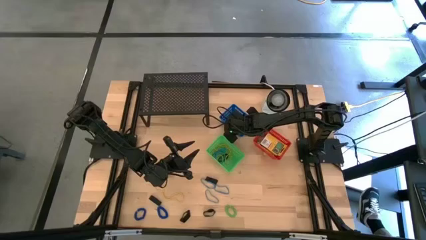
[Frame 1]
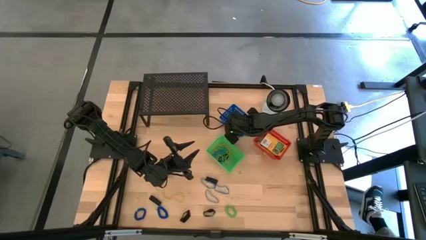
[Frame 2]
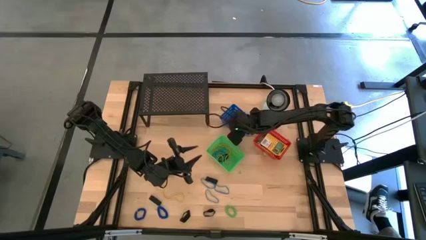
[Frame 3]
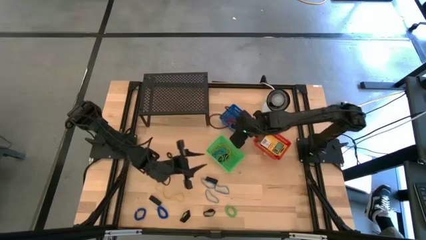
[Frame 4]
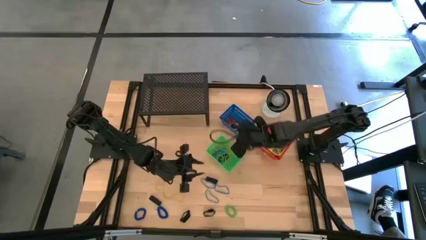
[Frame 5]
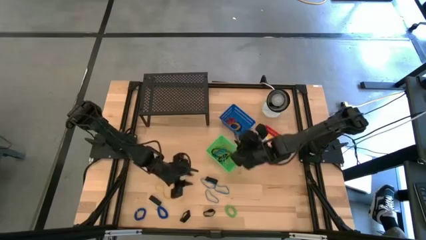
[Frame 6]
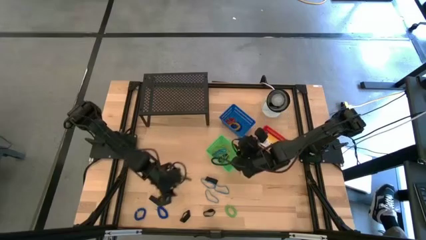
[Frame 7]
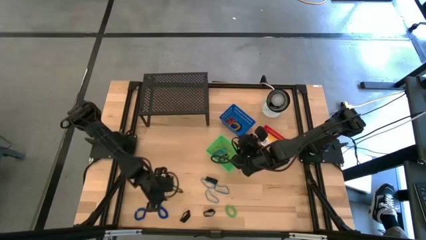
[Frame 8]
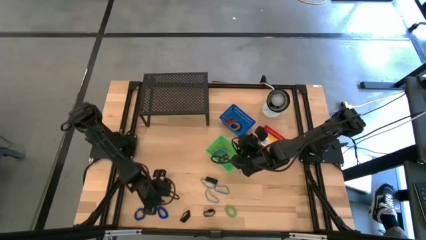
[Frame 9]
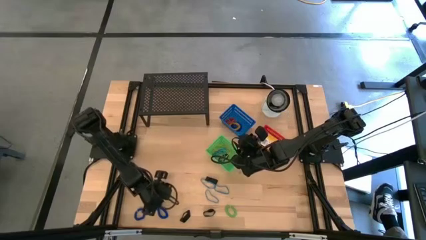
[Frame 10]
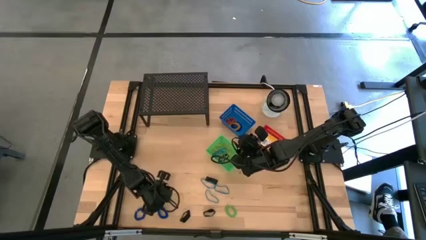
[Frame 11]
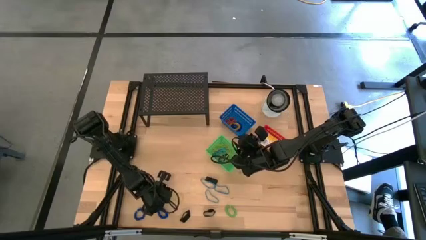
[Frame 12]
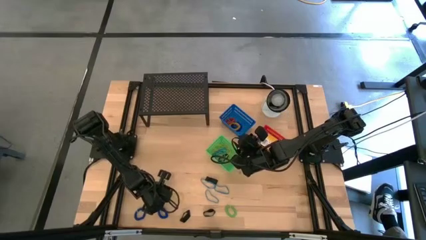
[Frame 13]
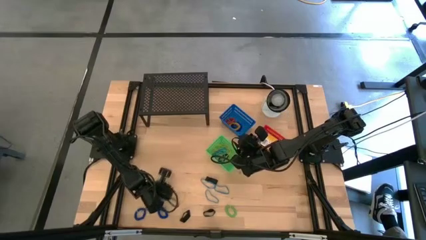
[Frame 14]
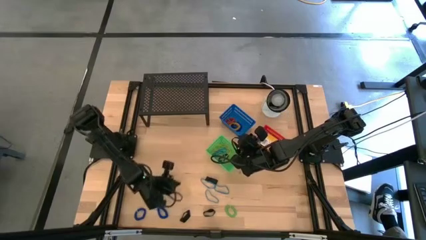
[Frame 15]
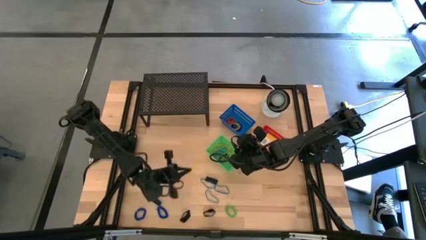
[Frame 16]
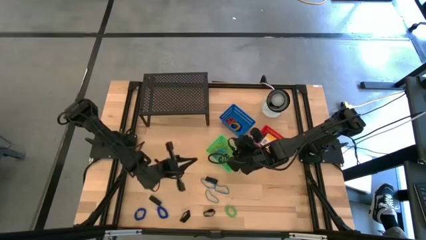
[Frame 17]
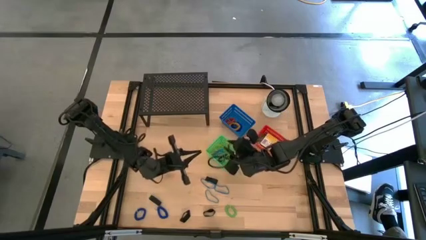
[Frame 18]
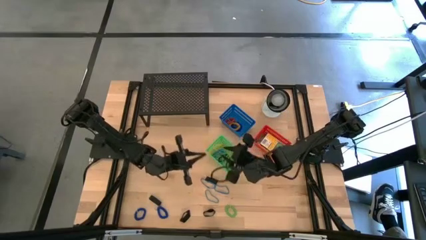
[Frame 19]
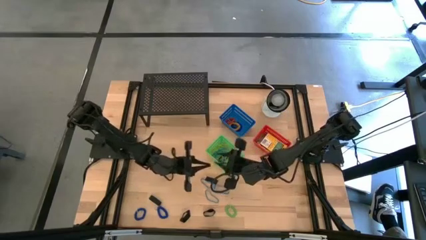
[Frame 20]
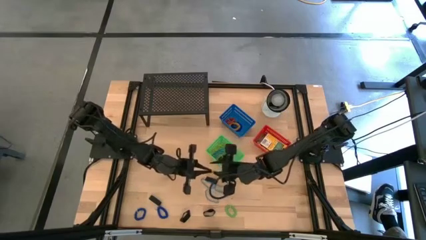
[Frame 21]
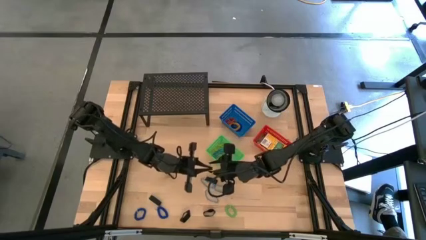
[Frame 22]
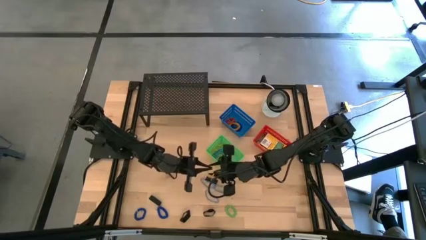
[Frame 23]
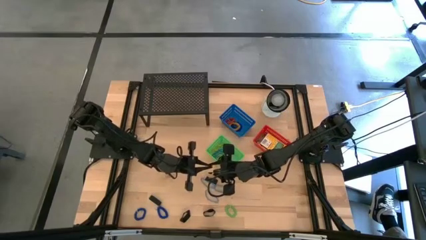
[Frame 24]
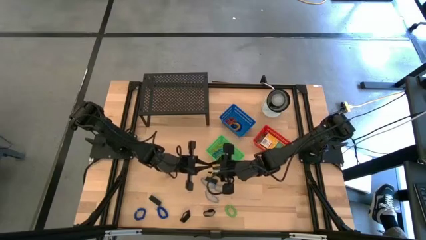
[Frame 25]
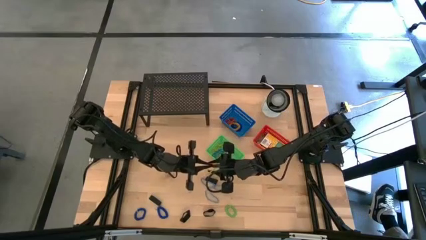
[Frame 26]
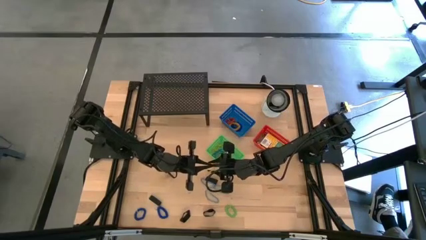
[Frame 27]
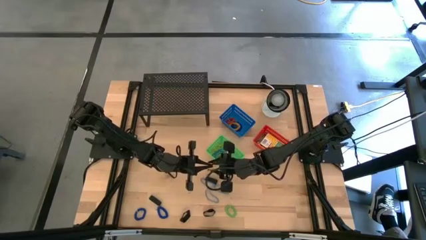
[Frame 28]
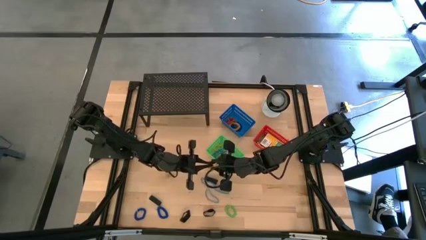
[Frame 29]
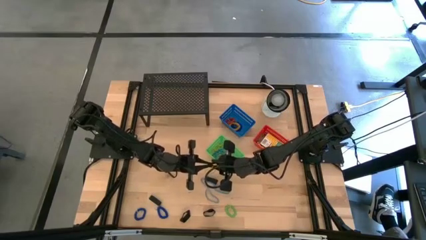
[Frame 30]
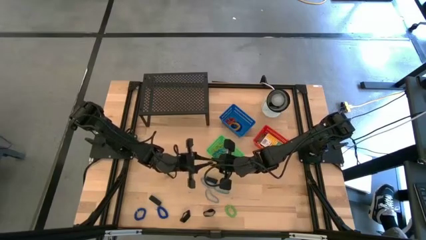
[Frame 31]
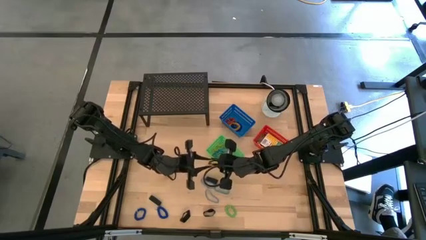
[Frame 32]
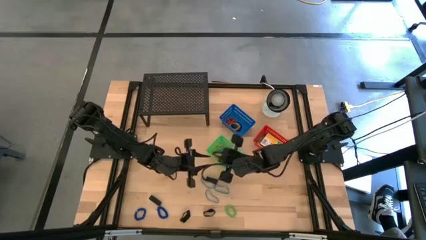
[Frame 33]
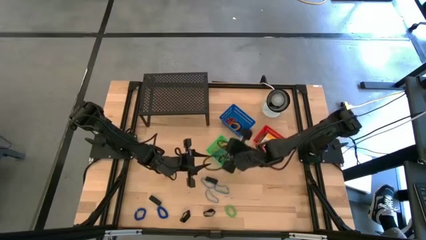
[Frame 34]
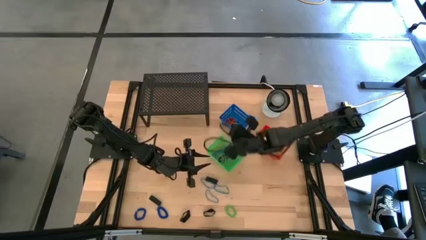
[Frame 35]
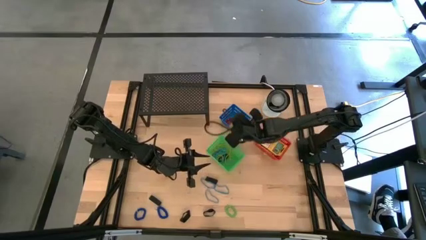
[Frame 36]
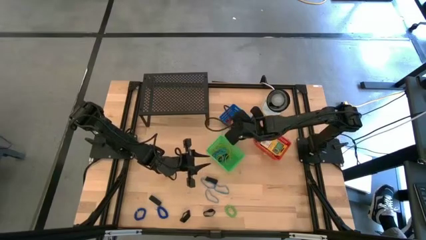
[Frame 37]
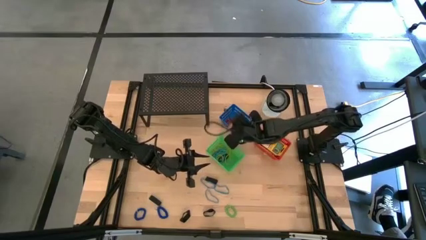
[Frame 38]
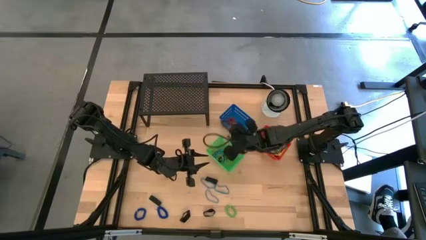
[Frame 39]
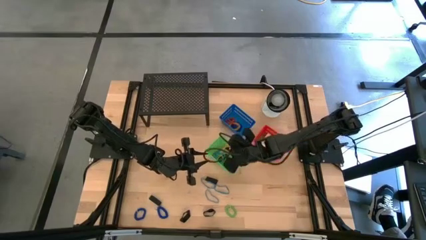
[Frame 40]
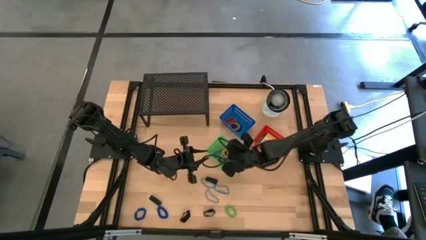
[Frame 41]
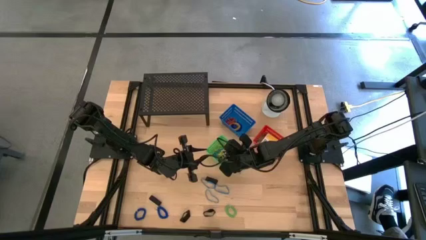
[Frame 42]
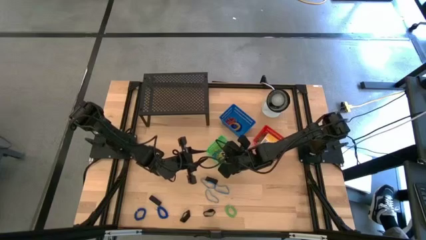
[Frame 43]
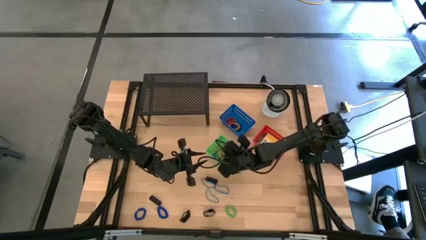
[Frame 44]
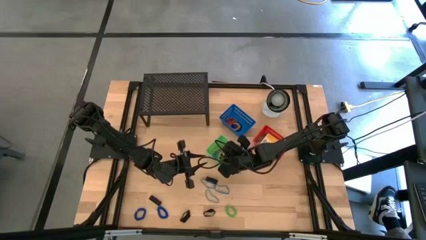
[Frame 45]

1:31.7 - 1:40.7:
Task: Pick & Place Office Desk Supplies
Put the yellow rubber band into the green basket

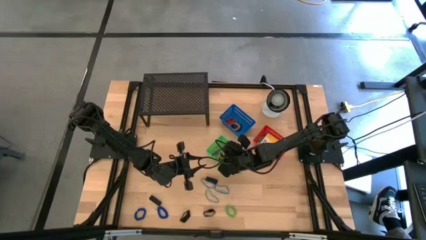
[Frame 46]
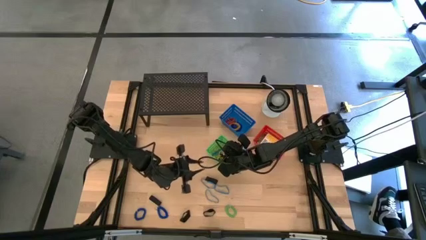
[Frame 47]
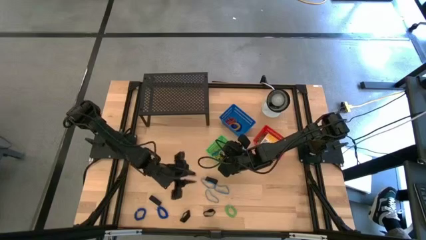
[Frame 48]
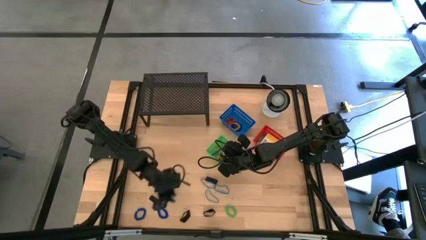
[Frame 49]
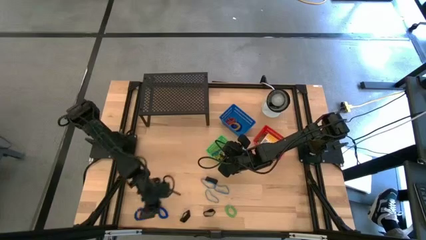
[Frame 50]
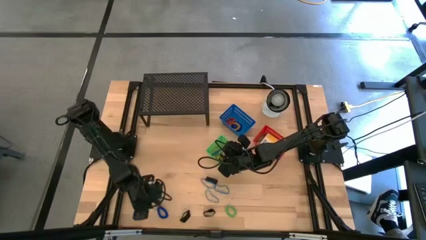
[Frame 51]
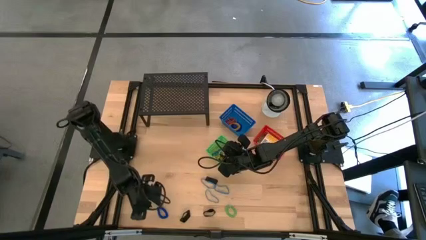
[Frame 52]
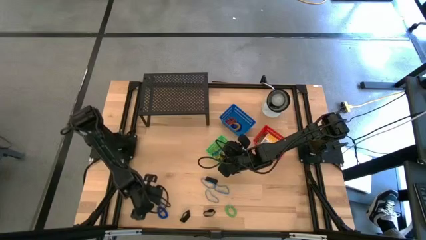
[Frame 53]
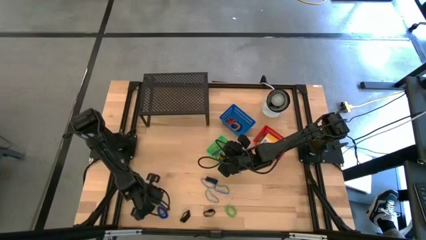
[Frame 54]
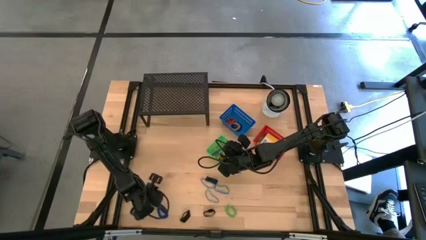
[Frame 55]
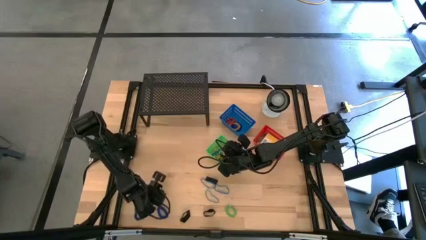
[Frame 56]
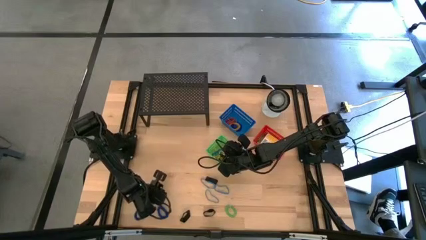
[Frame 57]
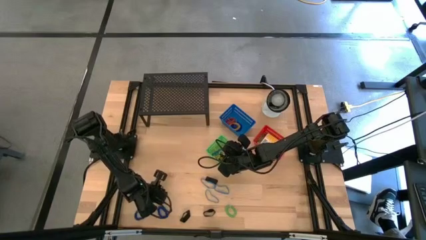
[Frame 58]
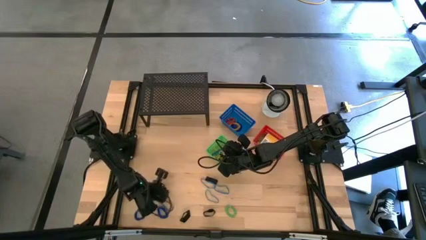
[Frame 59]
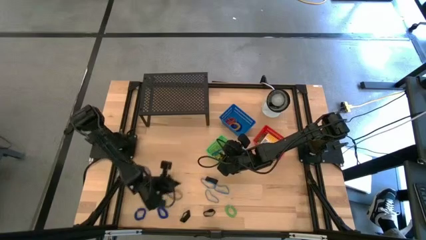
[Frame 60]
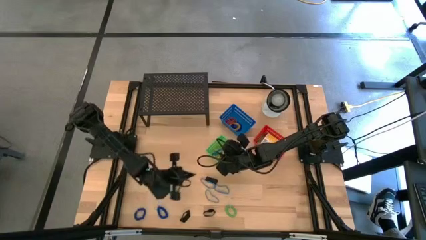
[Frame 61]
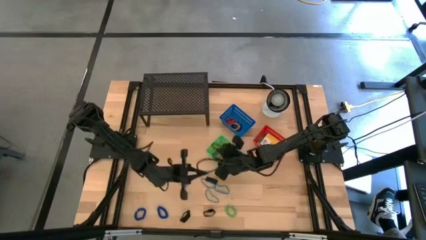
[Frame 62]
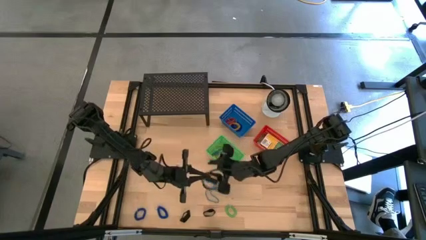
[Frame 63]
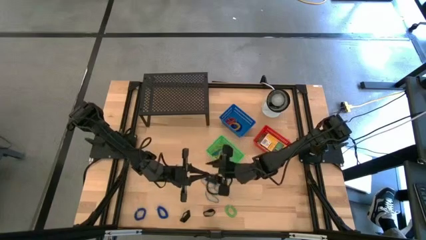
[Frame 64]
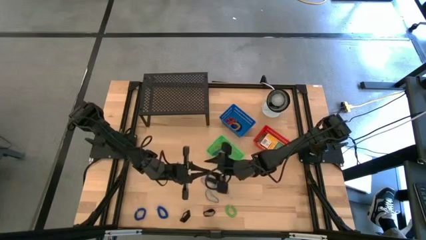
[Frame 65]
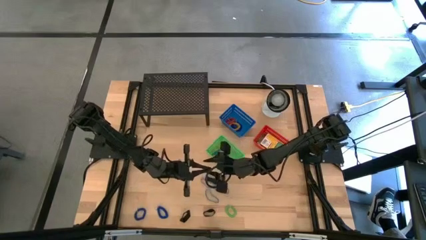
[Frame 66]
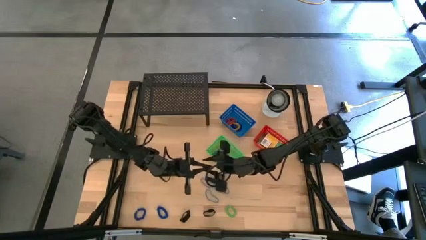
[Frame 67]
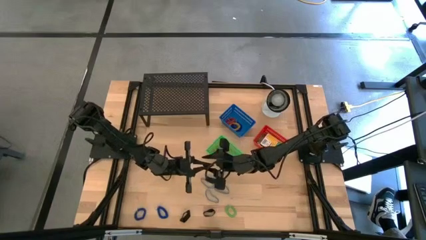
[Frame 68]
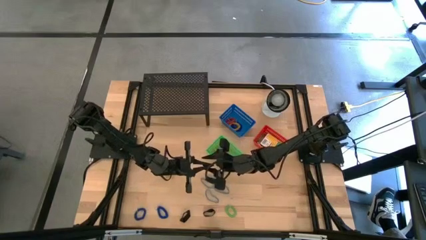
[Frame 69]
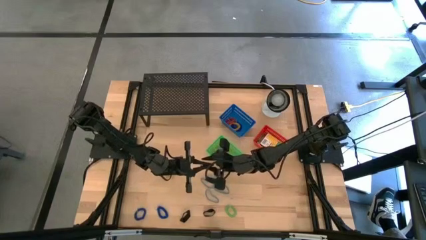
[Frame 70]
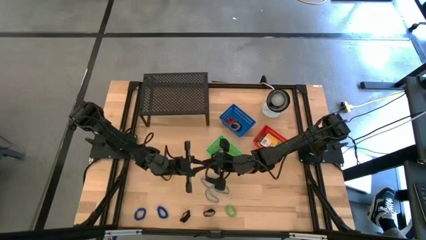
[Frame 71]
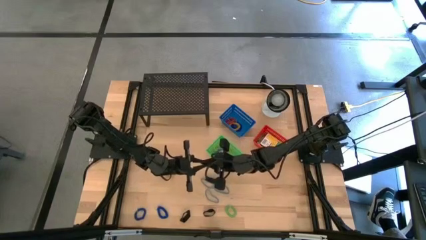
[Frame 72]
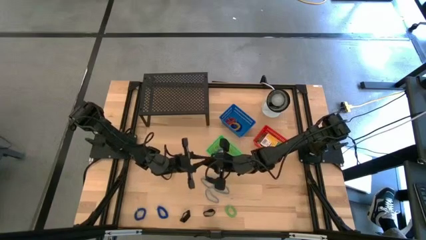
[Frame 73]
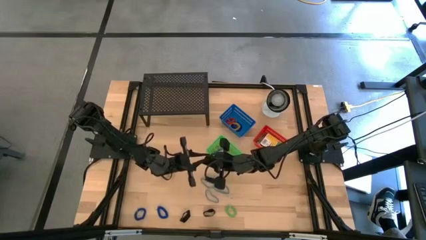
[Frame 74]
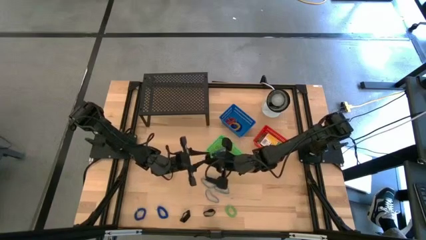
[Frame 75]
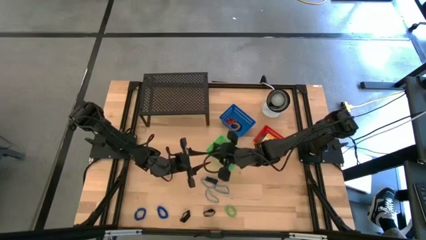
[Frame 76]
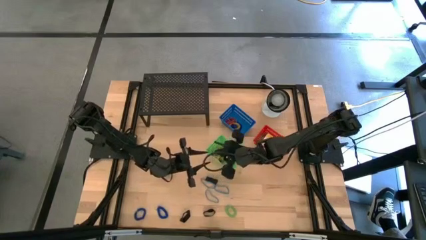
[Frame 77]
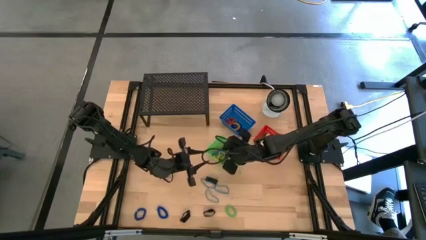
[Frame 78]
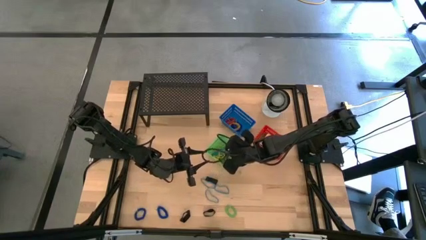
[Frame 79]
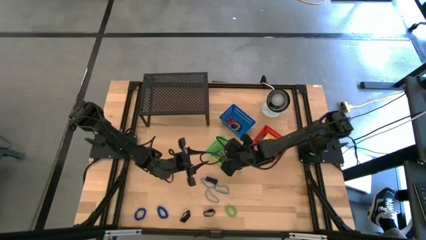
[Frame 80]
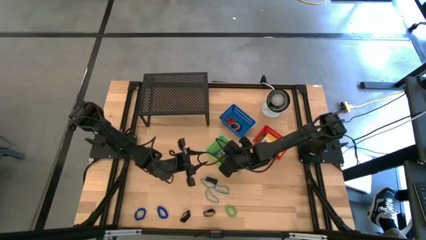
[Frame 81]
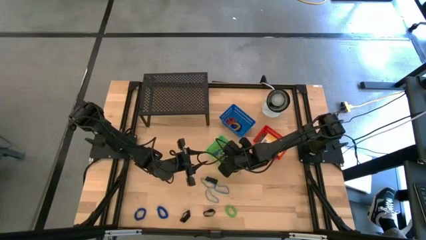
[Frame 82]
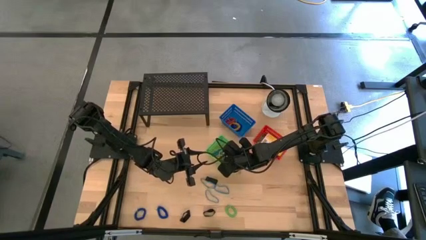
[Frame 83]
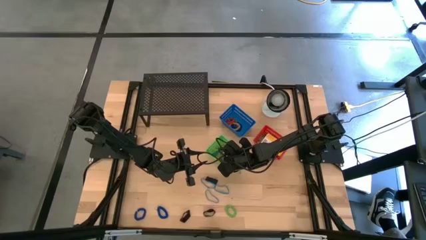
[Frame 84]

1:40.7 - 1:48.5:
Put the black rubber band into the green basket
